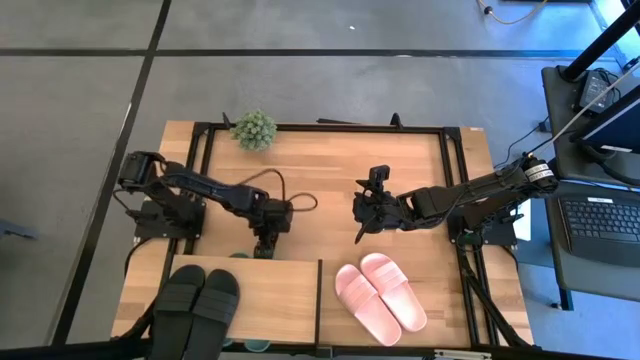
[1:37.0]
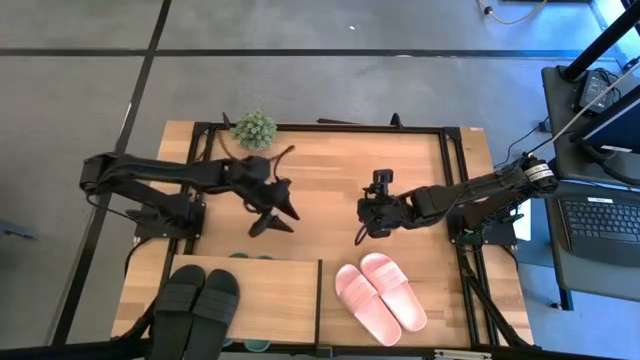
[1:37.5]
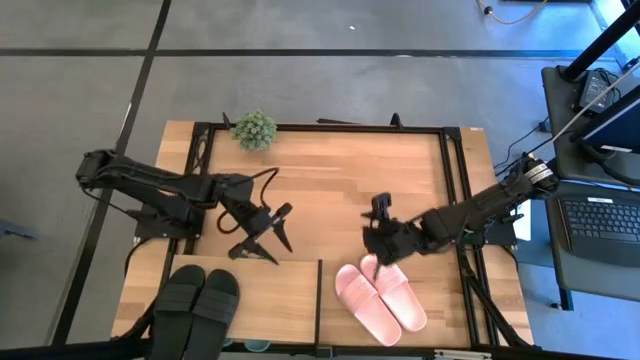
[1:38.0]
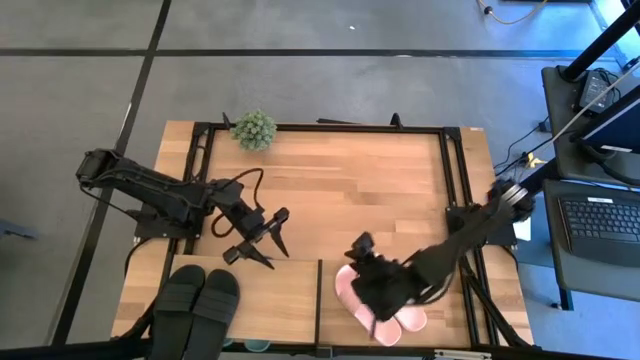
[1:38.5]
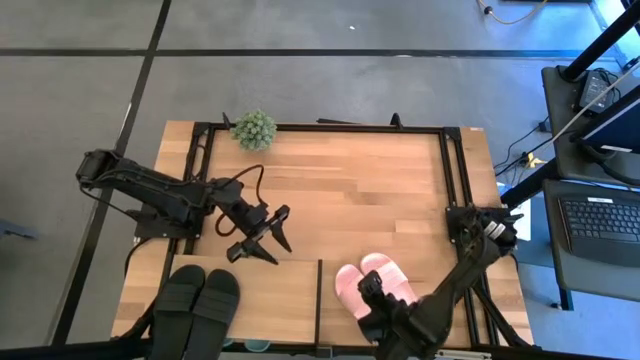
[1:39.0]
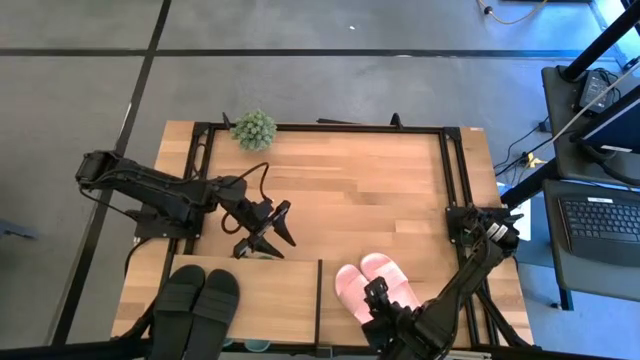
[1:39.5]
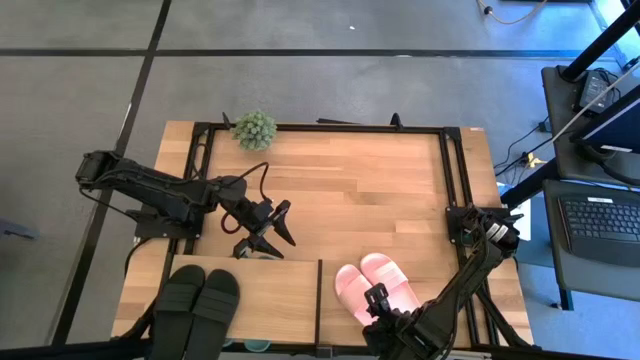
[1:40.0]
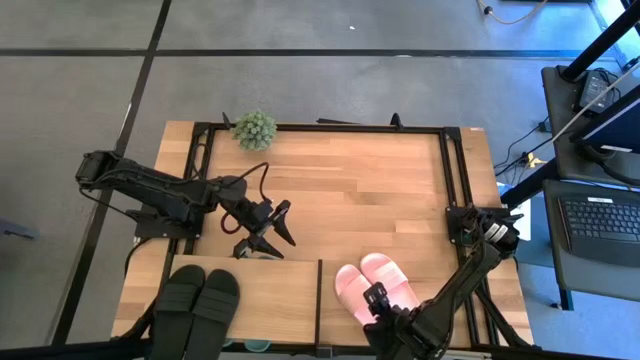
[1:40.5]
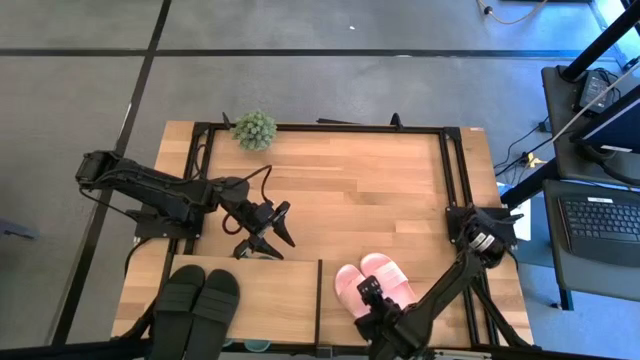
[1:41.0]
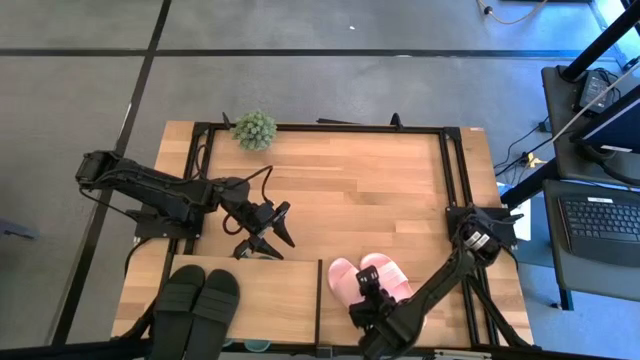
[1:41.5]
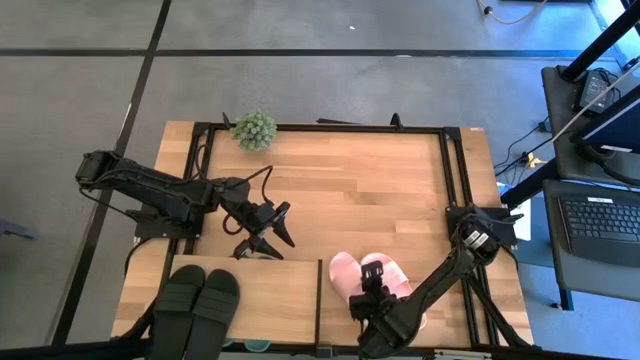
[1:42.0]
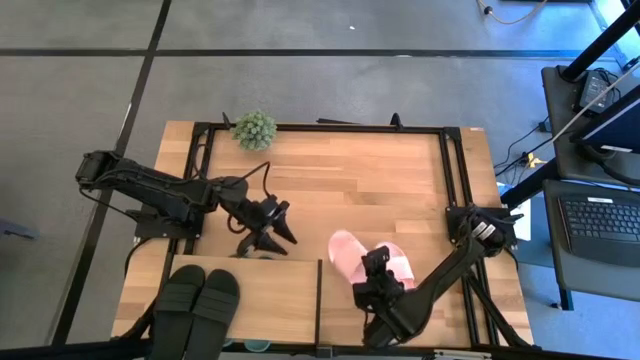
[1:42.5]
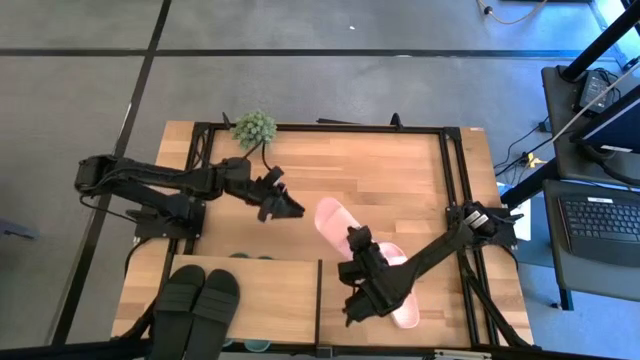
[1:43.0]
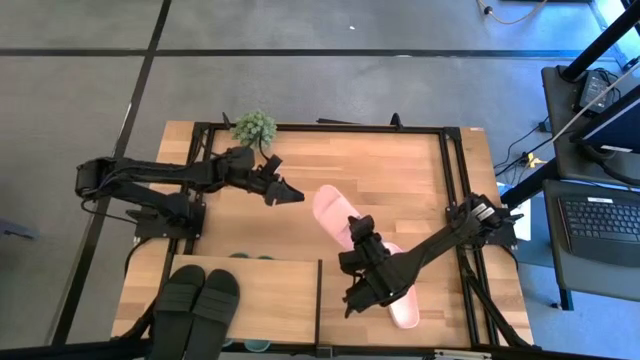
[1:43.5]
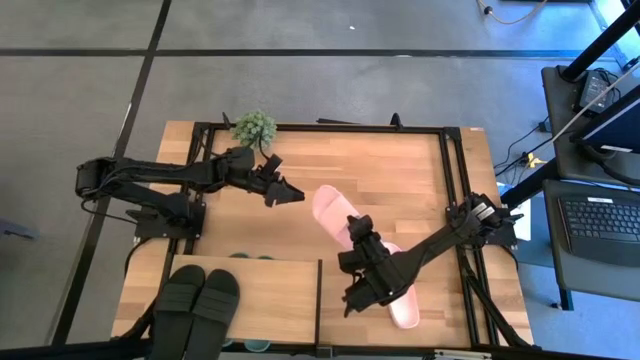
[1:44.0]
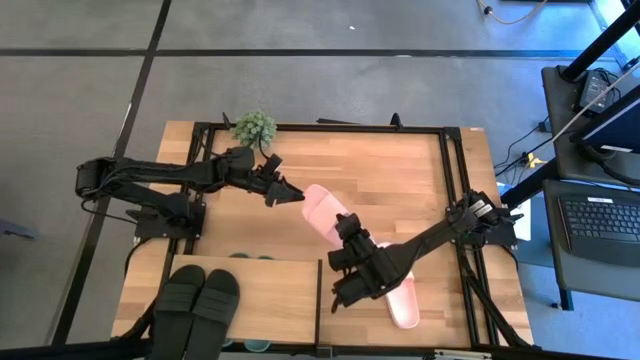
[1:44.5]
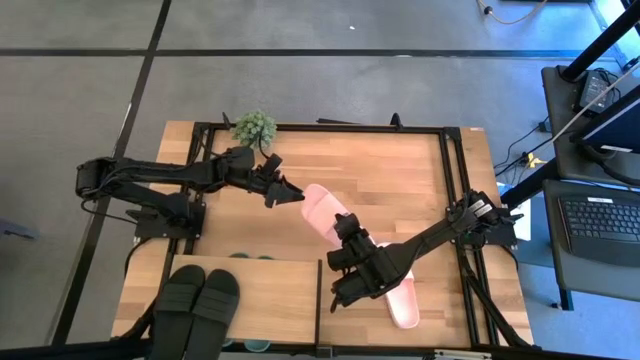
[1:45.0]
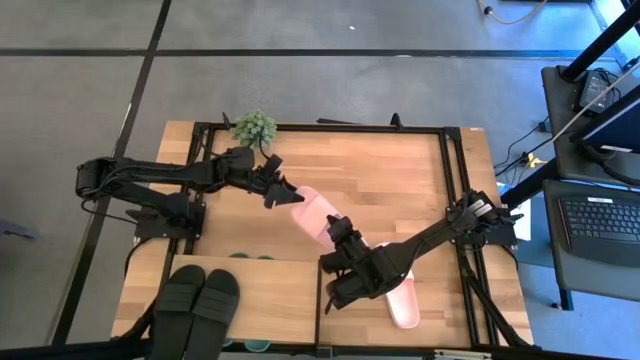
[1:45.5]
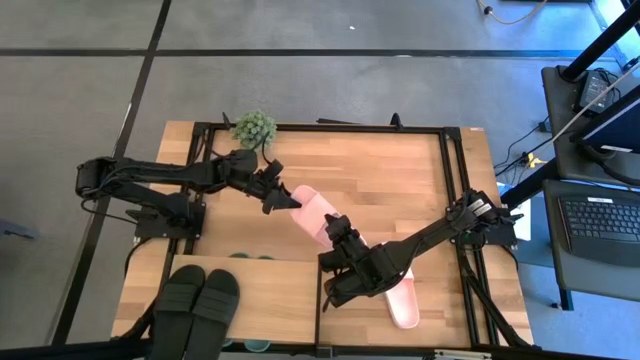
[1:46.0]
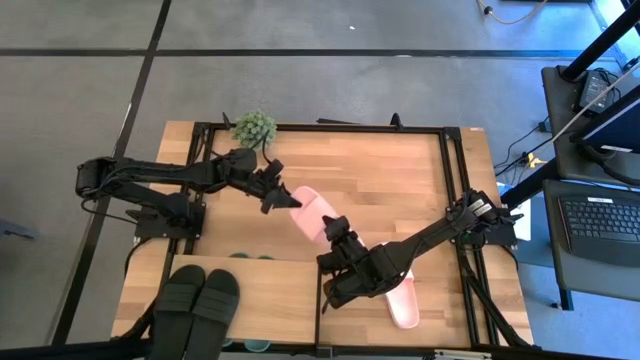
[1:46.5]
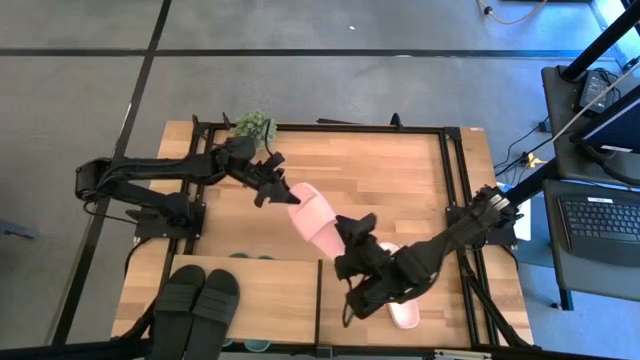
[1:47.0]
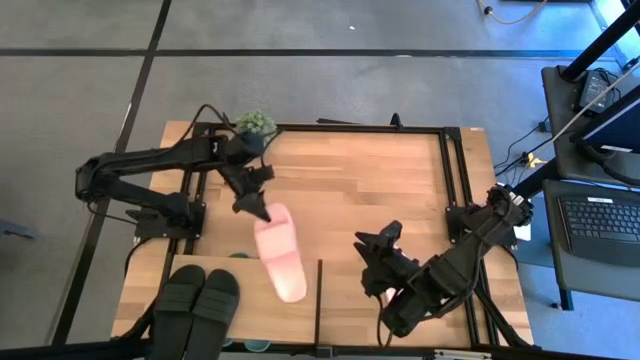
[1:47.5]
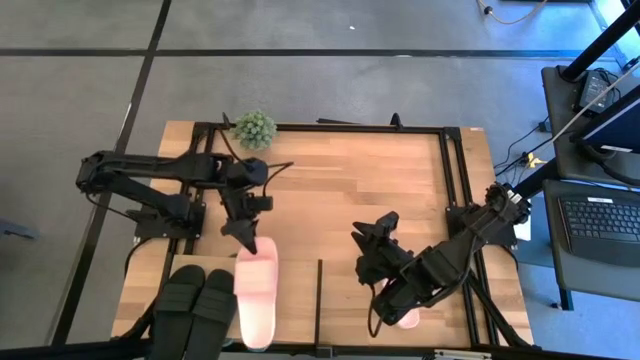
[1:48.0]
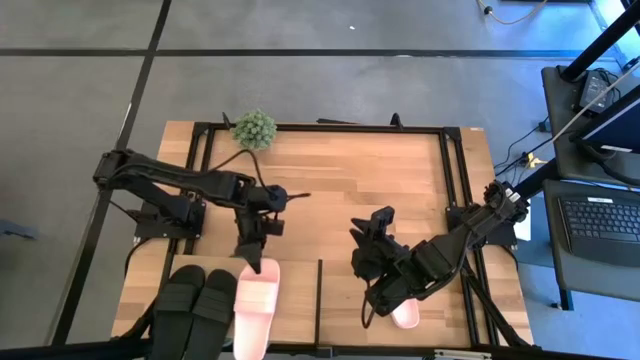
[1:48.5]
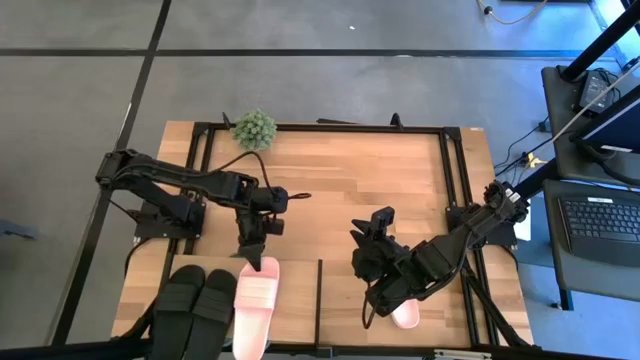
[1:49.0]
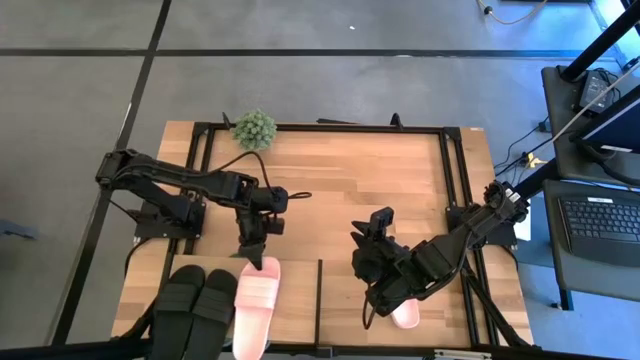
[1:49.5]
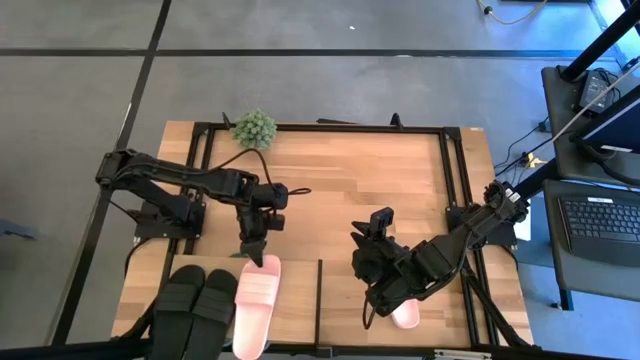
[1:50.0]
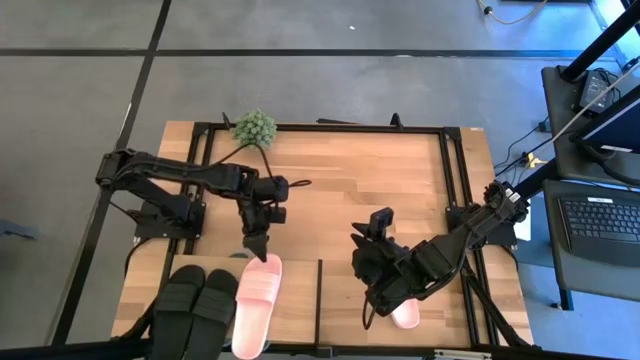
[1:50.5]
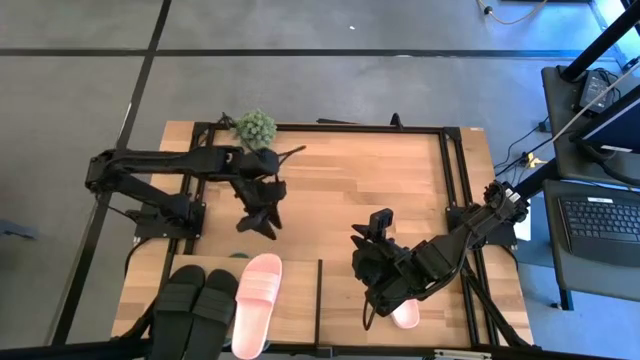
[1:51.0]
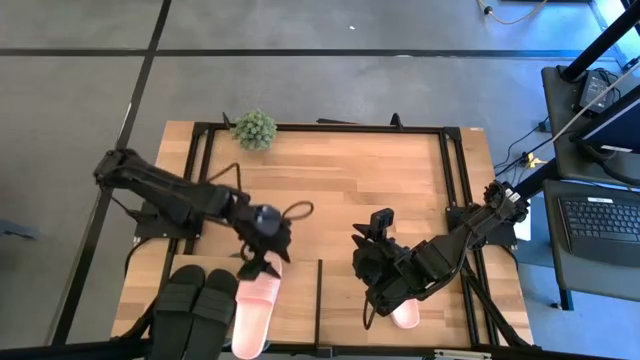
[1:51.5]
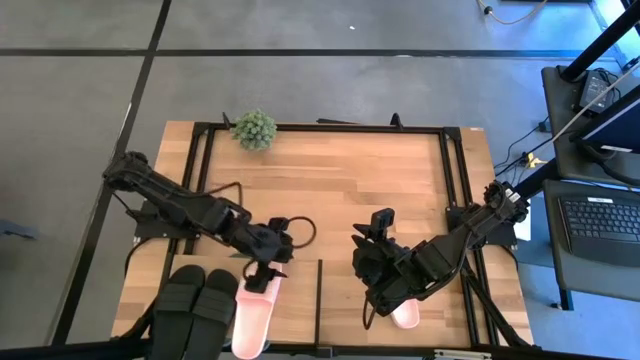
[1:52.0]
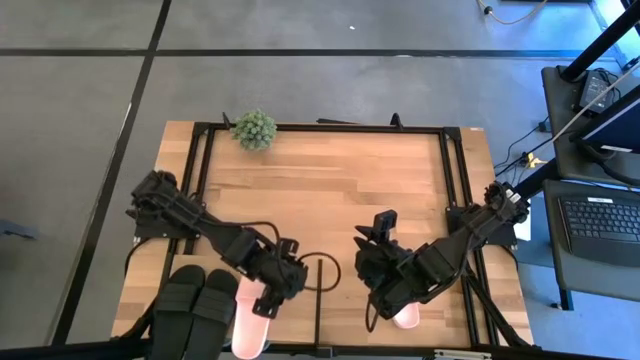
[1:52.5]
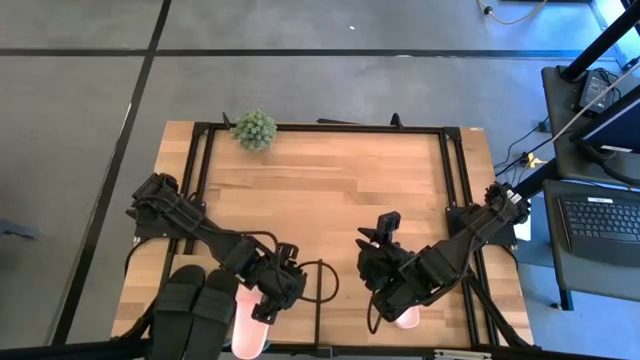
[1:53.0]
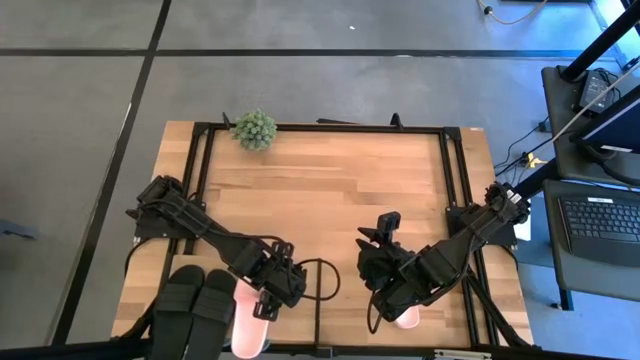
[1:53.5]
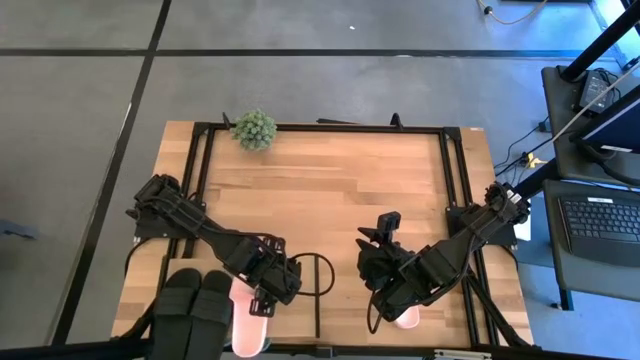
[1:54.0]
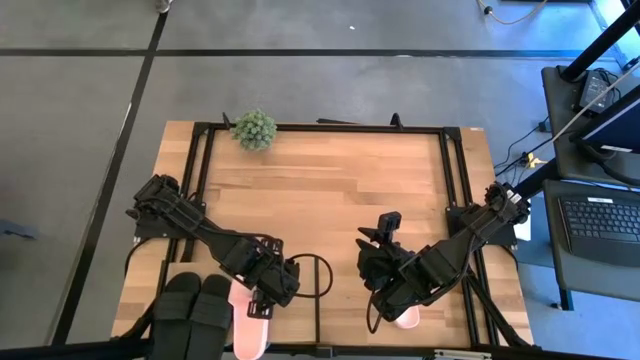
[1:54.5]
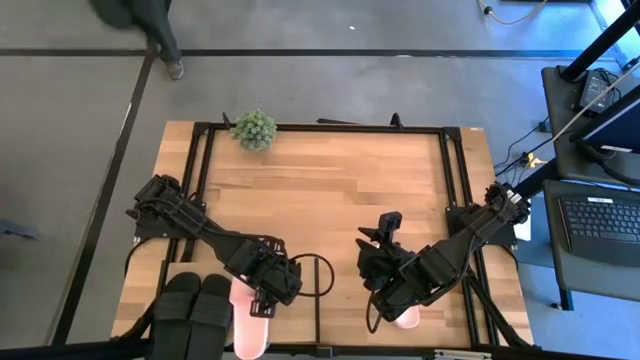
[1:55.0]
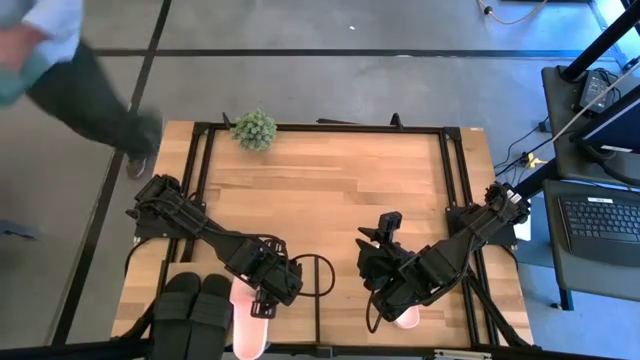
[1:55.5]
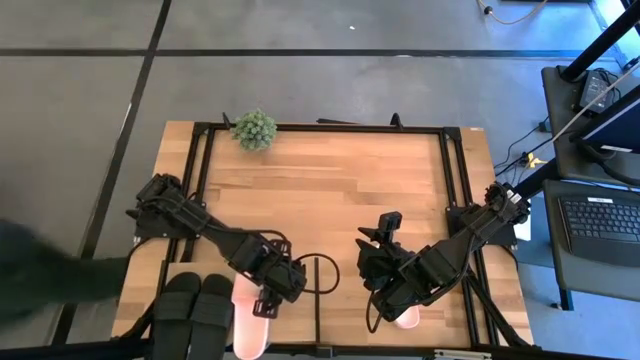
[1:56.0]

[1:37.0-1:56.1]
Task: Pick and place slides into the shelf
Put the left pink slipper on the shelf

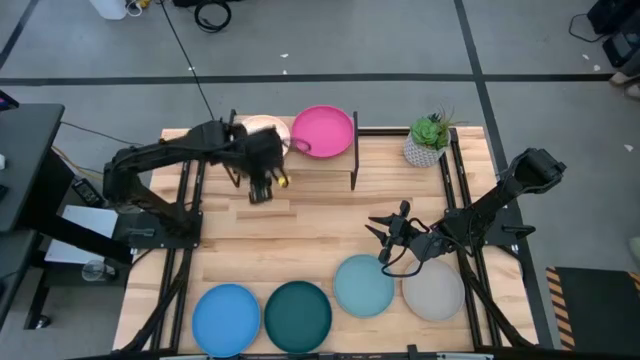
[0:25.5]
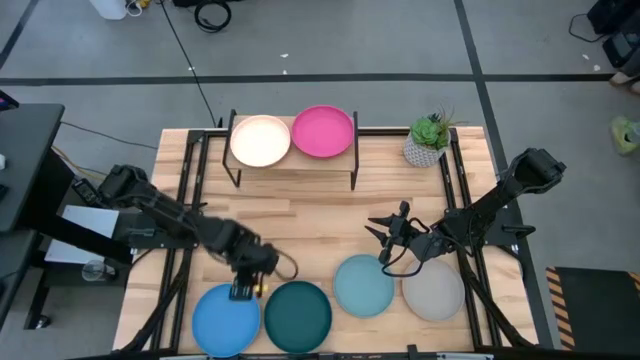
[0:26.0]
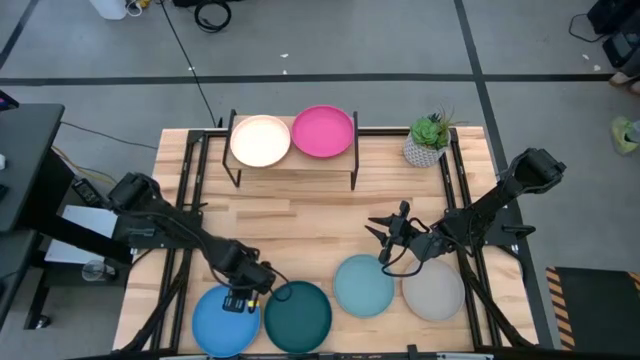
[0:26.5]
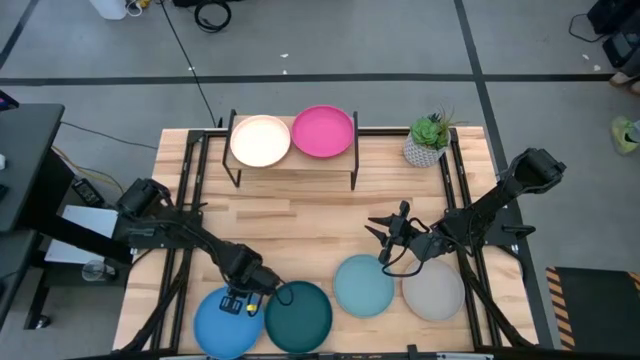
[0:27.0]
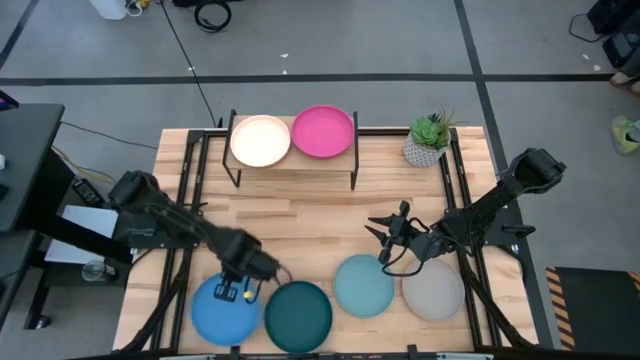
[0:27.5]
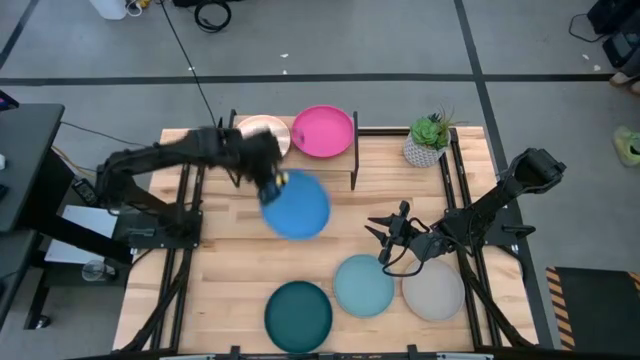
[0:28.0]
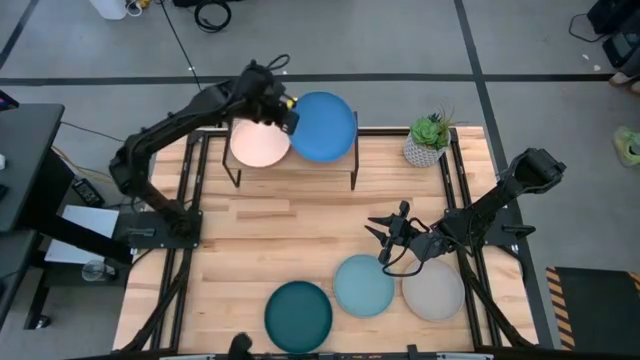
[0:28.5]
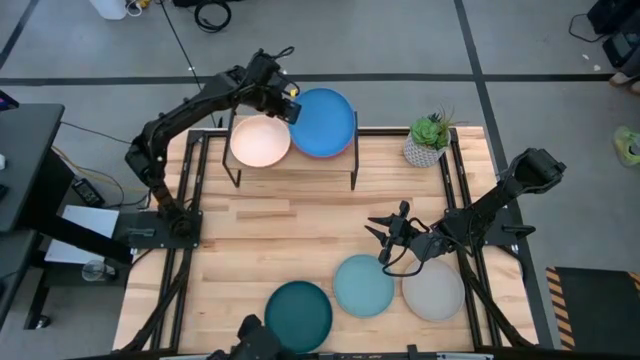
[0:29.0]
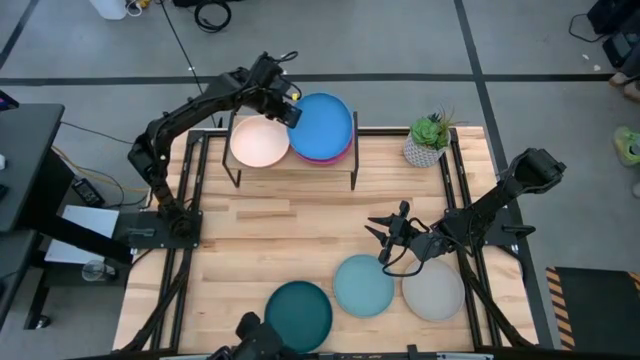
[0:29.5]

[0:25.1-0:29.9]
Task: Place and stack plates onto a shelf
Stack the dark blue plate on top of the pink plate on the shelf
